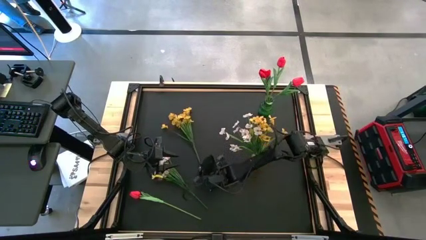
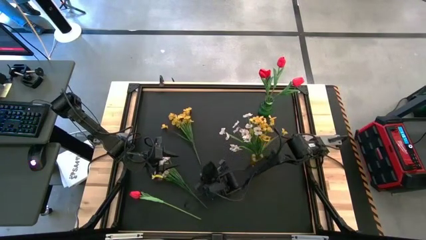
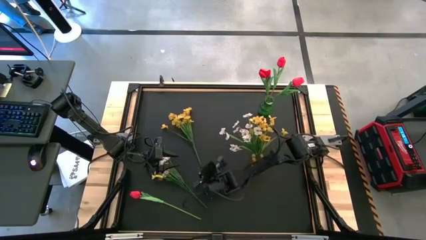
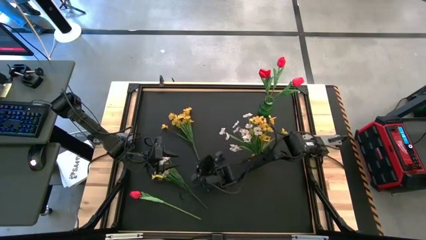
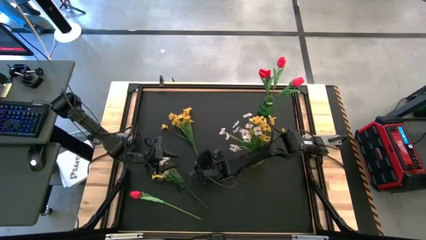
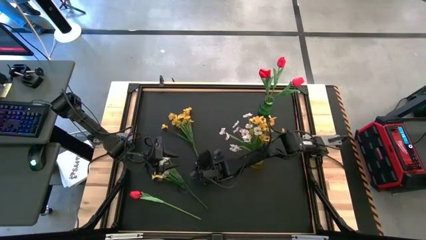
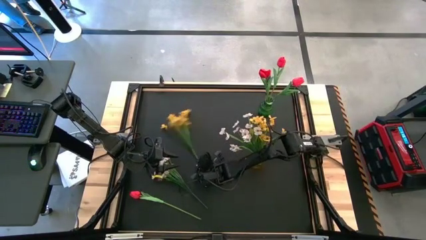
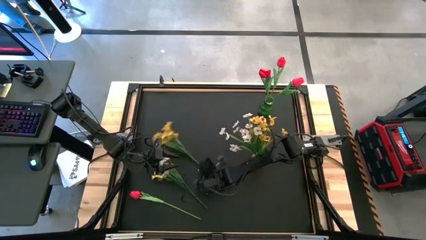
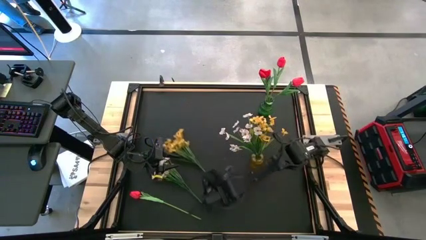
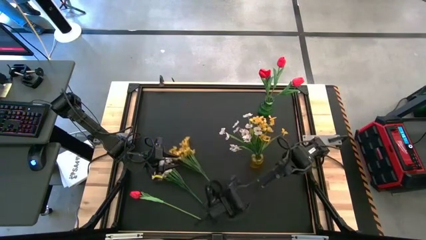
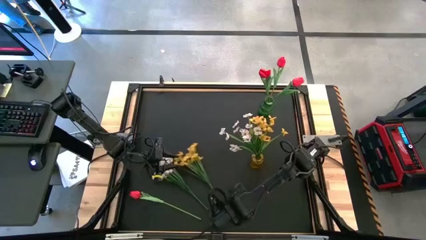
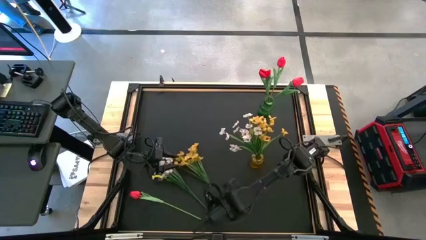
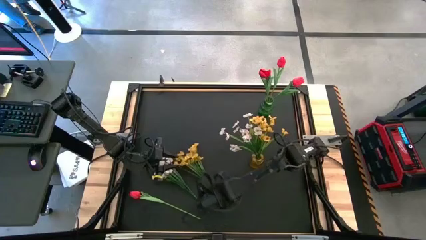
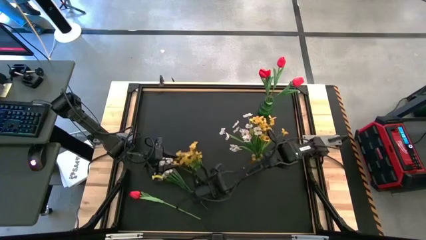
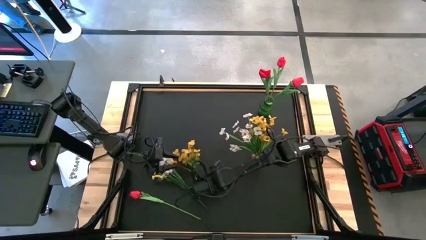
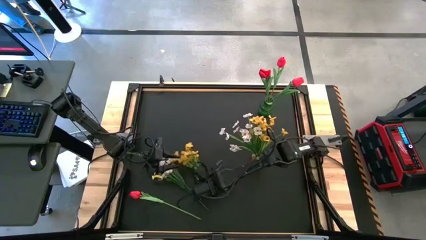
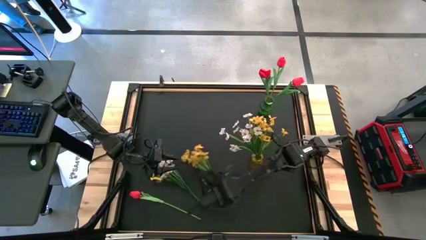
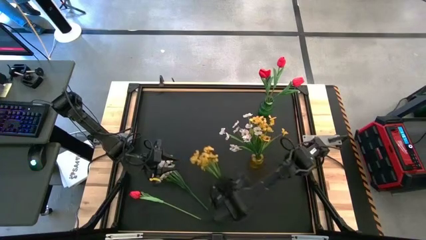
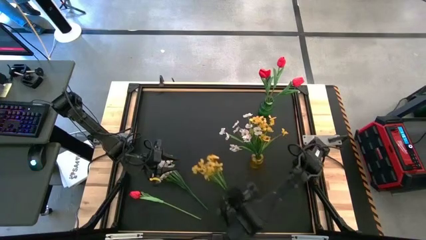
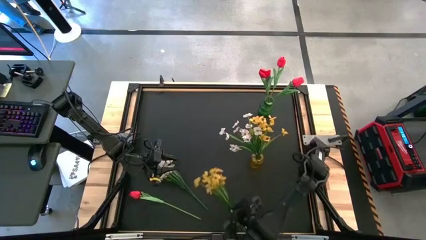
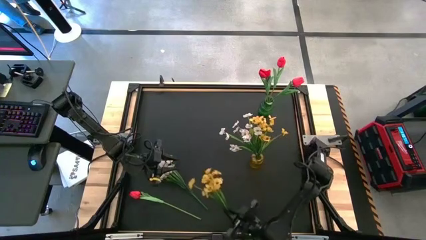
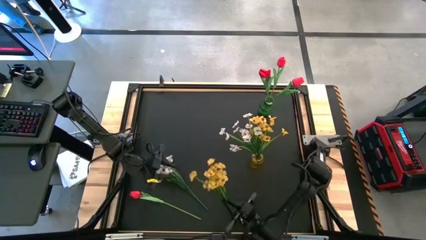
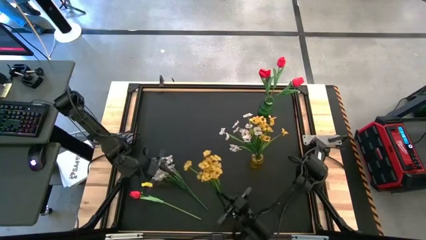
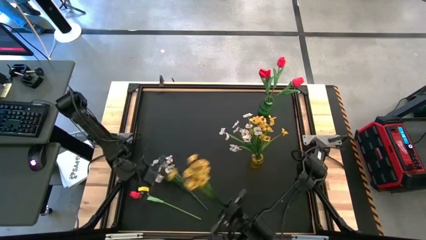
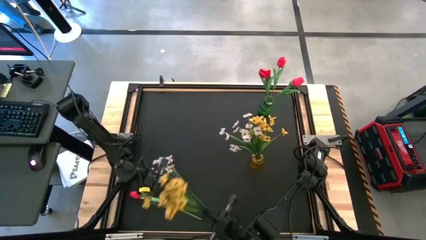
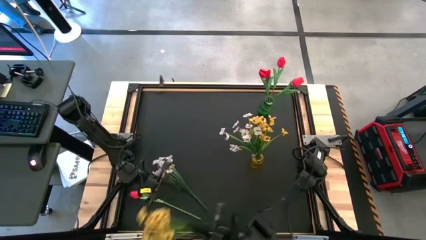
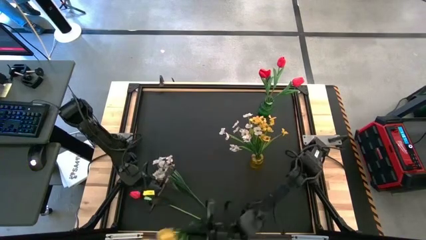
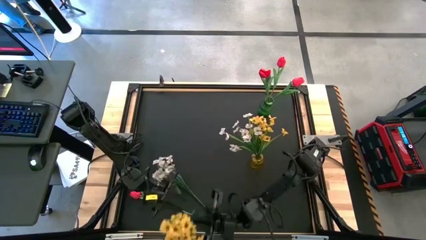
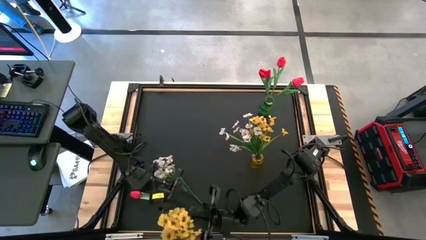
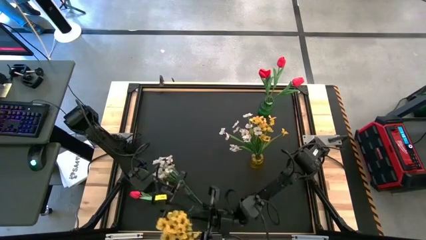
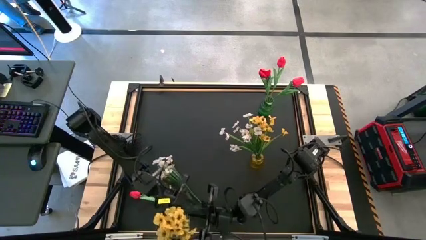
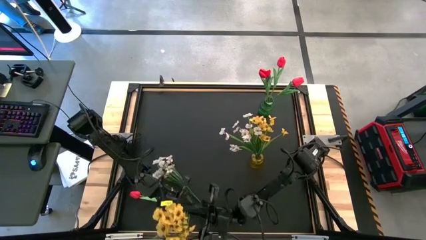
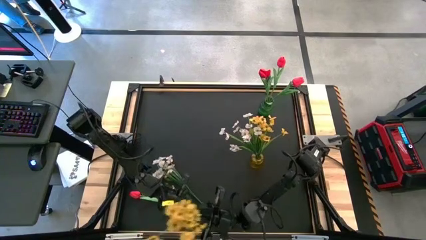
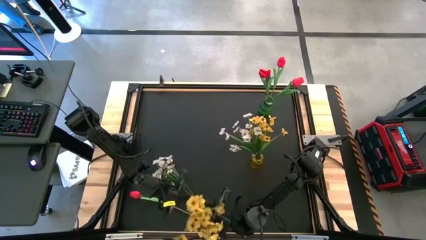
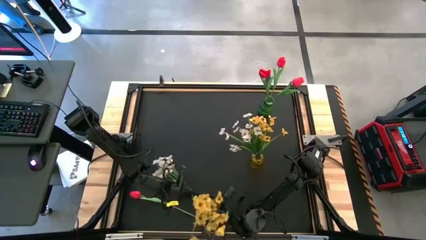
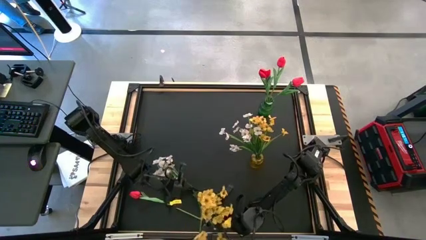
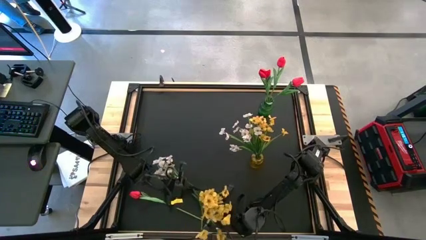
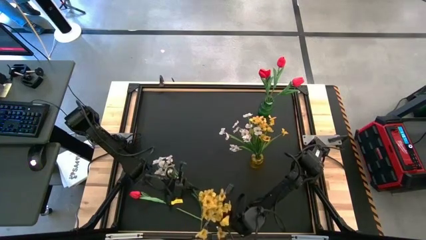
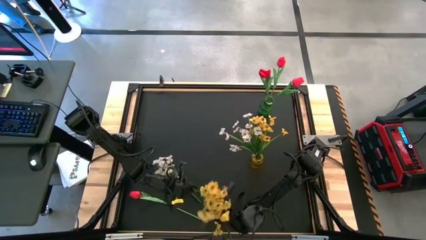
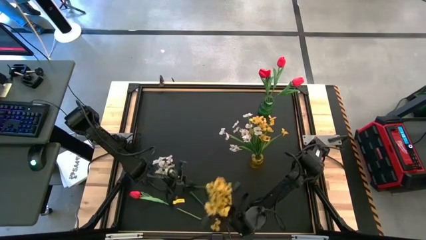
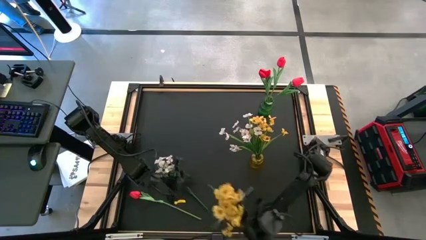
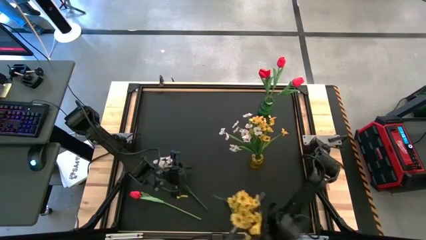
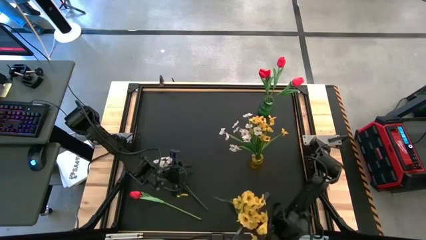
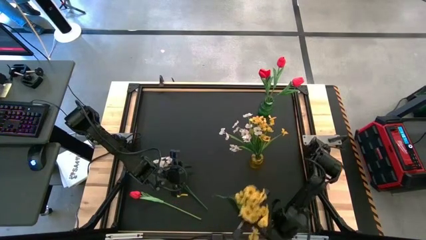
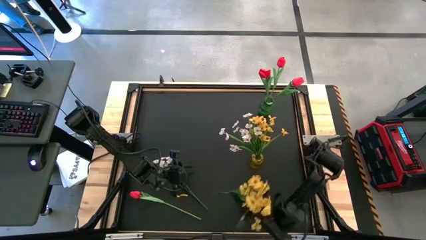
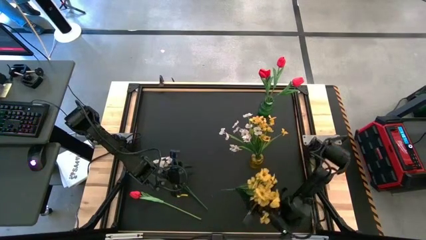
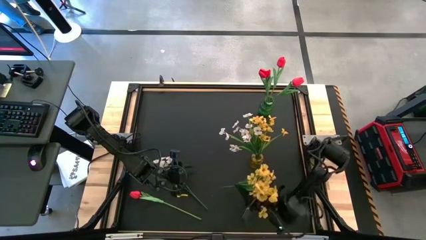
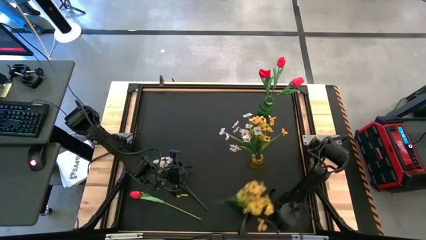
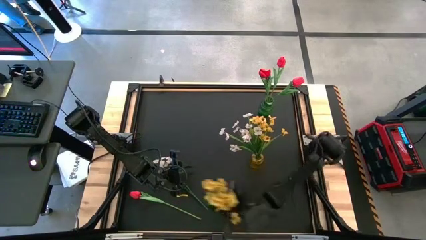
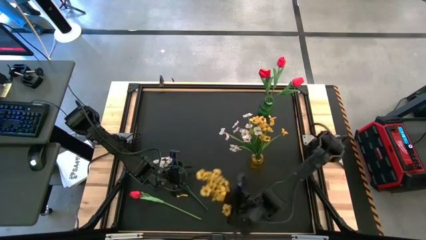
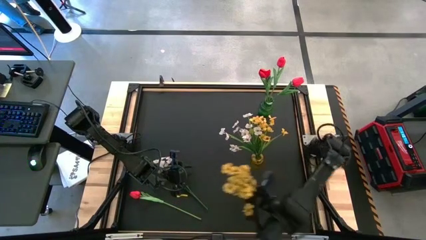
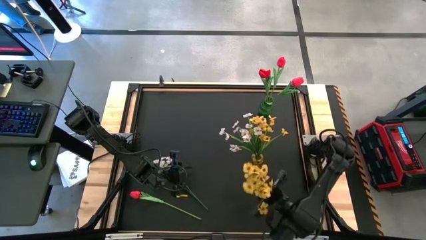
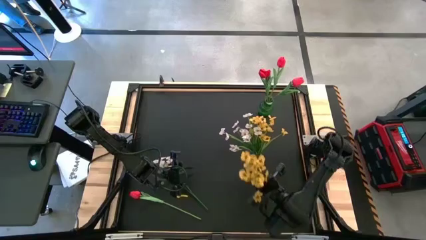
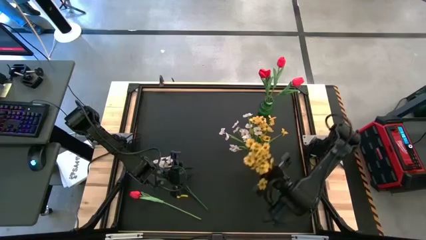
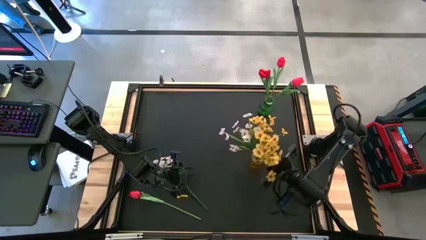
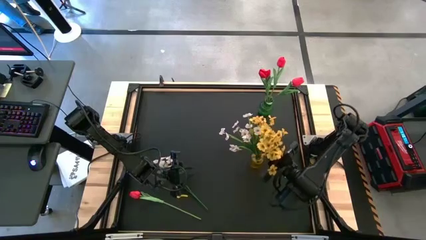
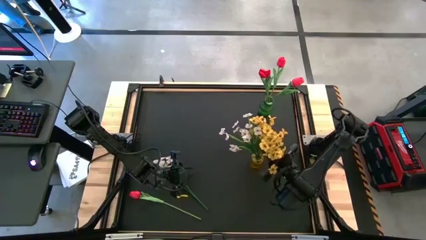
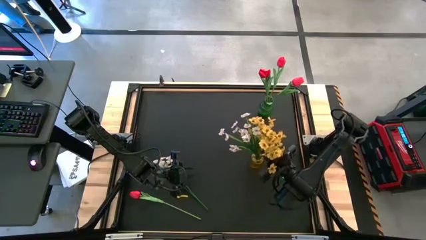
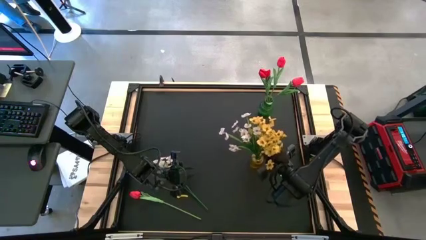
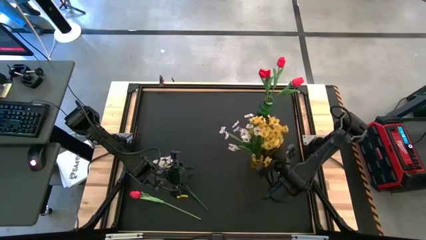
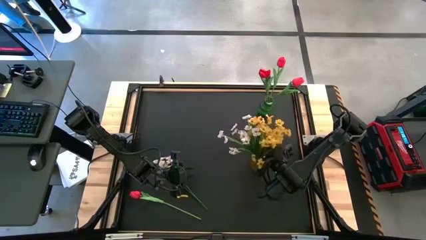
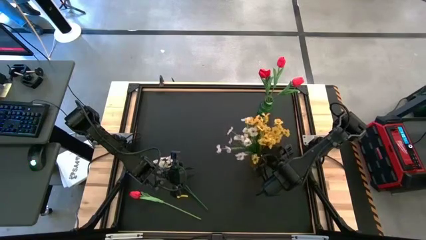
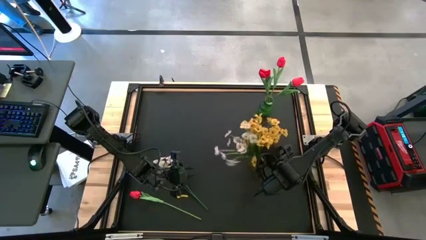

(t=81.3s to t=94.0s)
Task: Sort flowers into vase by color
Put the yellow flowers into the yellow vase
